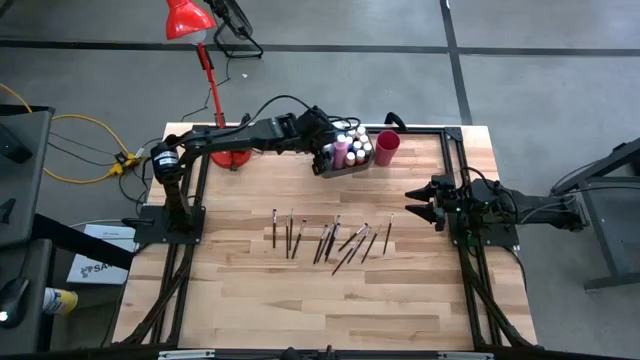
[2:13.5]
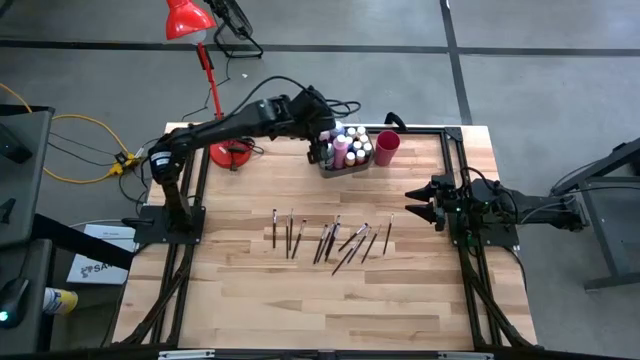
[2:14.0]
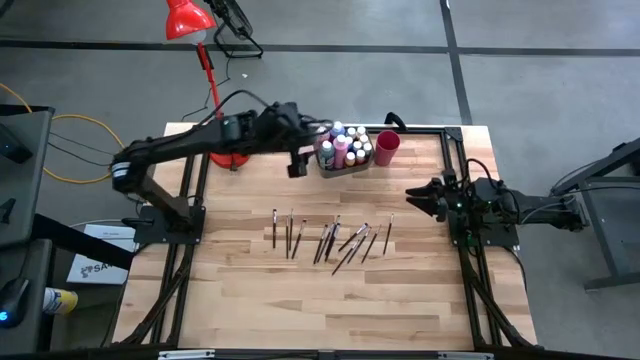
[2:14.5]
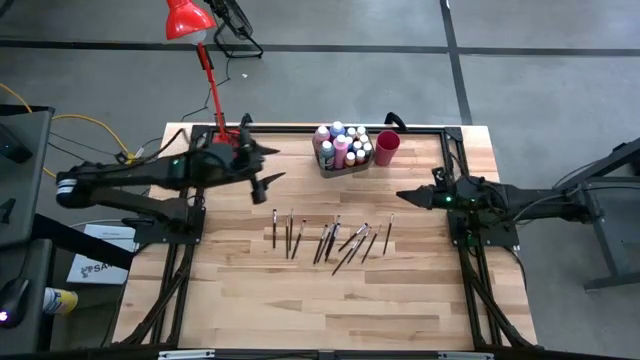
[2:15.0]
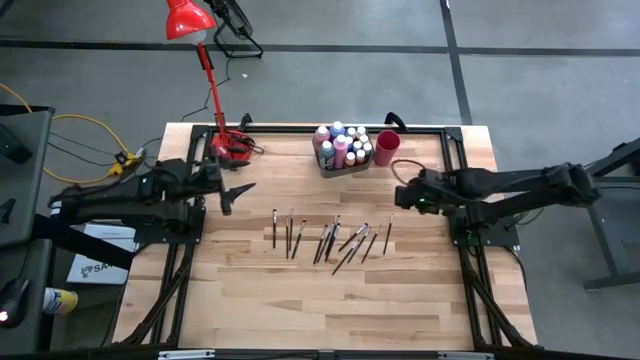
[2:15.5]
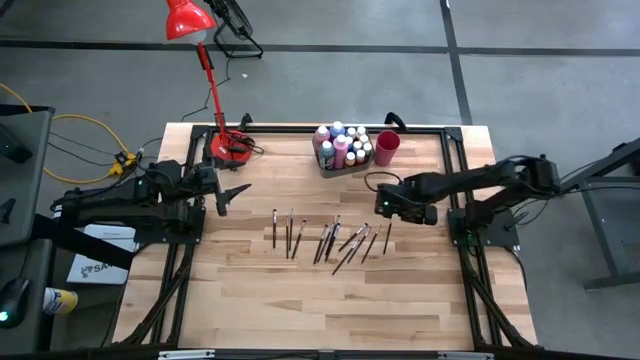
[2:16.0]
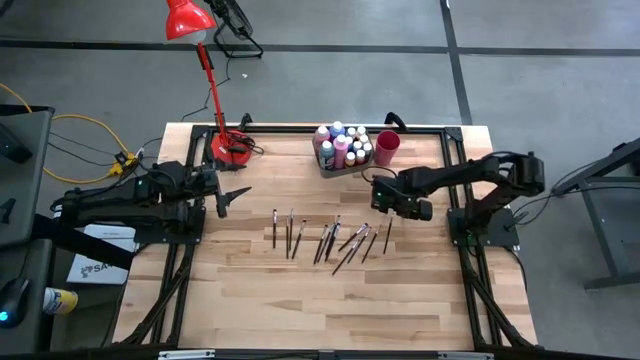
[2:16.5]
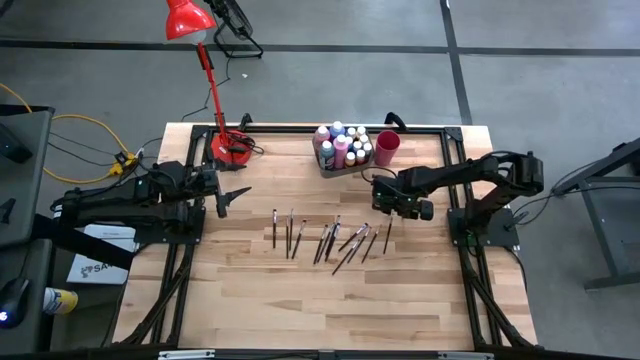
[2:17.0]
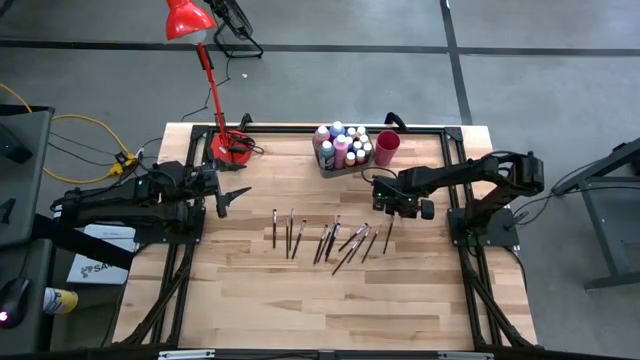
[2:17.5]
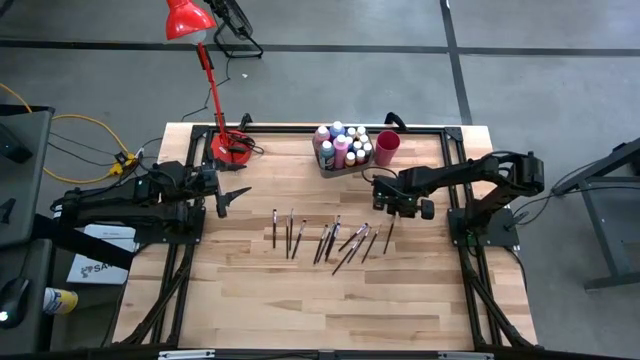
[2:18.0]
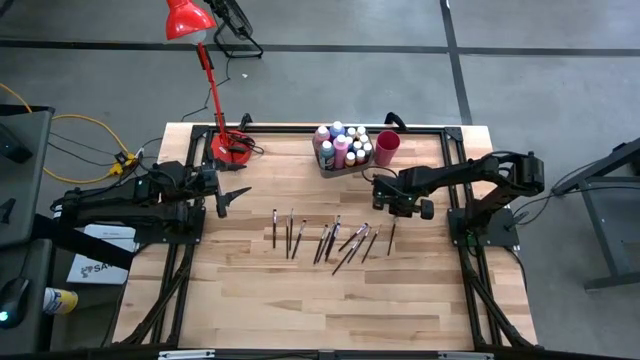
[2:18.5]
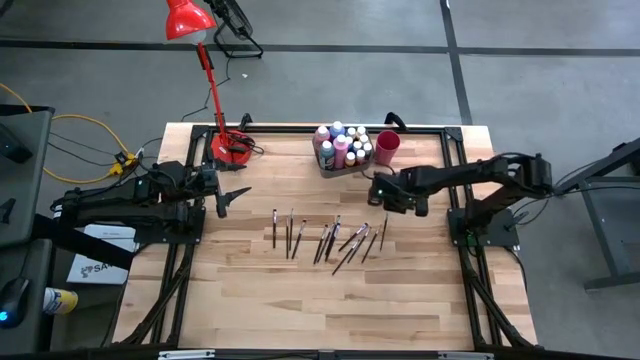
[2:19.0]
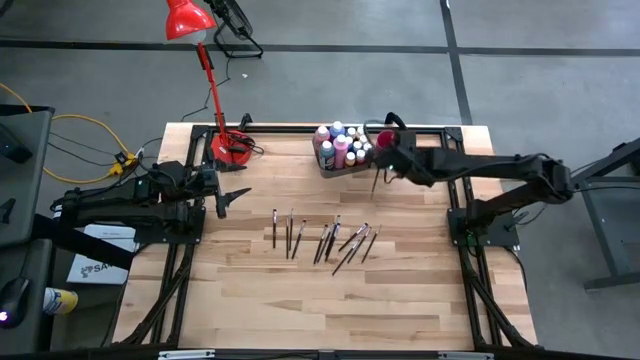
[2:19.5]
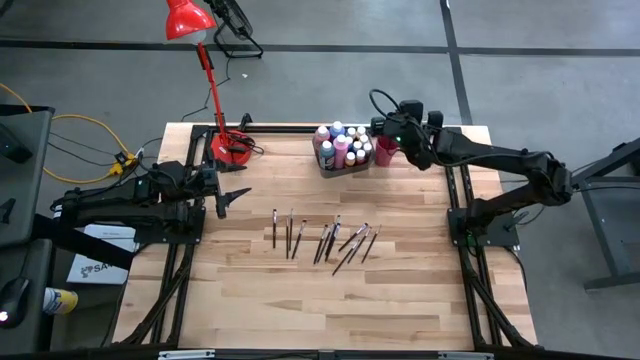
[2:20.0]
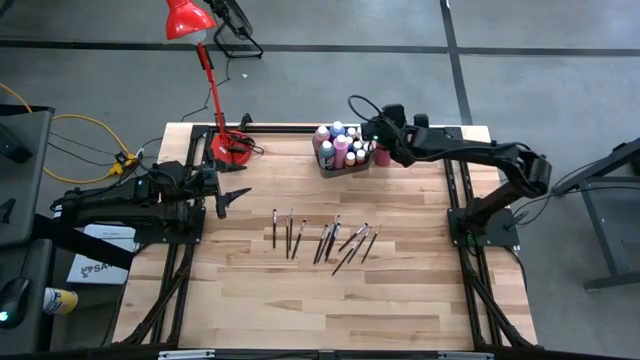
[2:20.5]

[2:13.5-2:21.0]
Task: Pick & Place Paint Supplies
Put the black paintbrush into the red cup

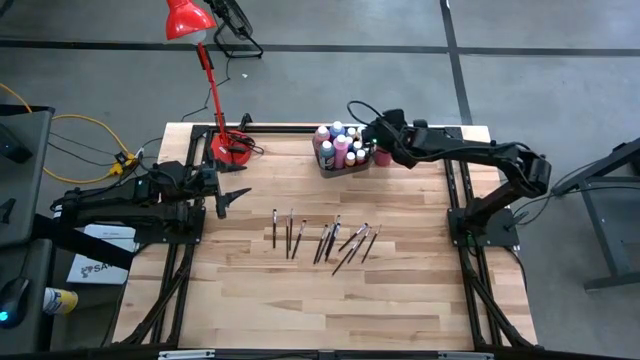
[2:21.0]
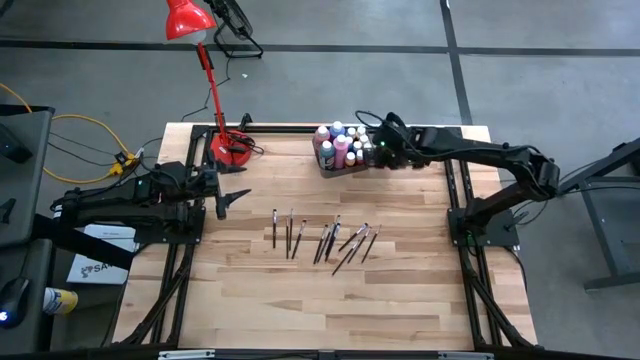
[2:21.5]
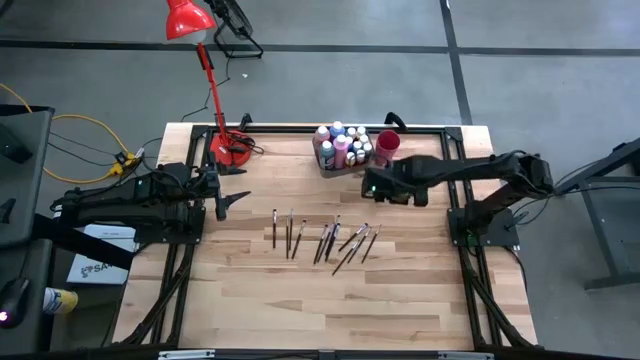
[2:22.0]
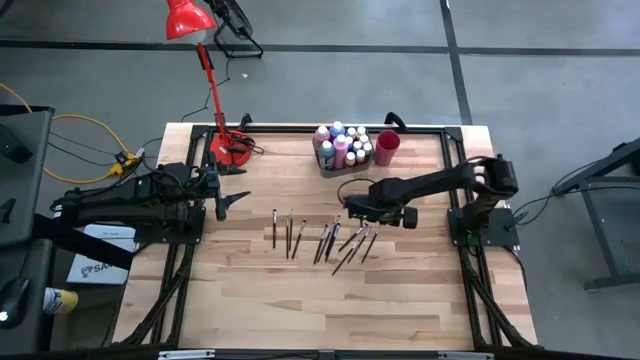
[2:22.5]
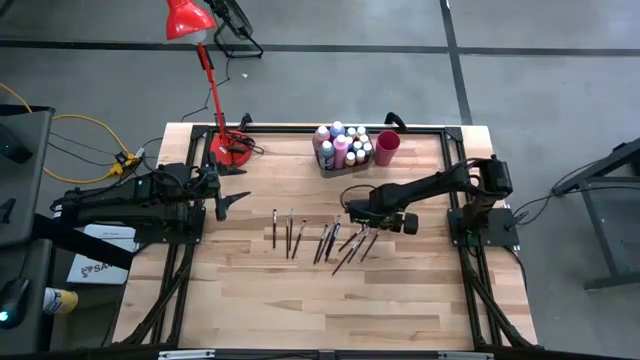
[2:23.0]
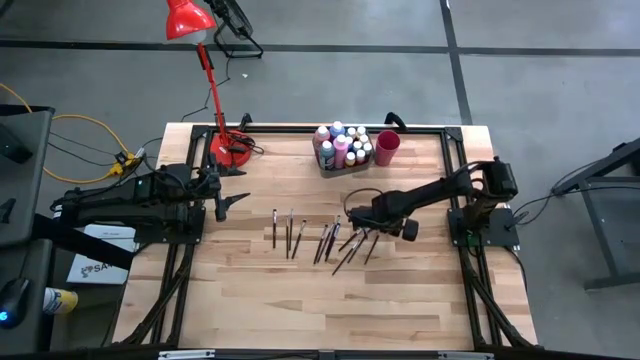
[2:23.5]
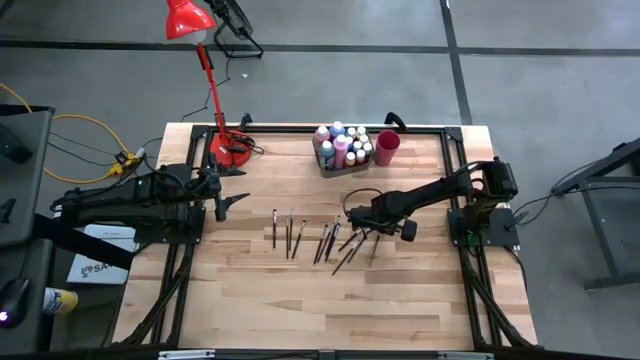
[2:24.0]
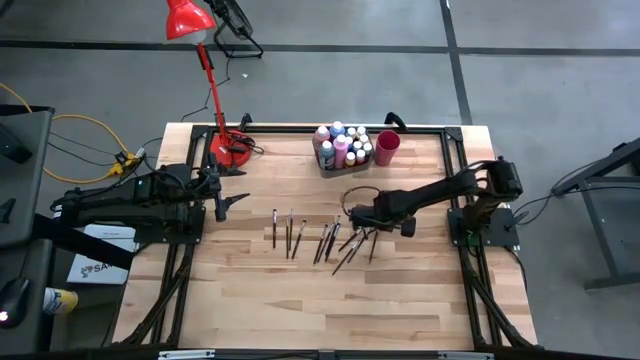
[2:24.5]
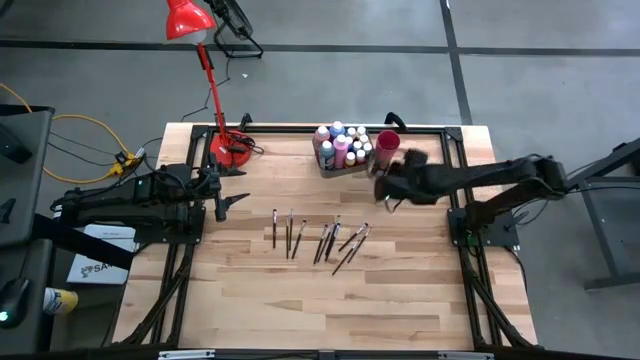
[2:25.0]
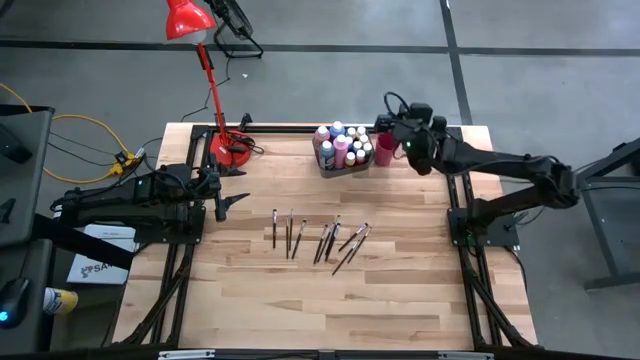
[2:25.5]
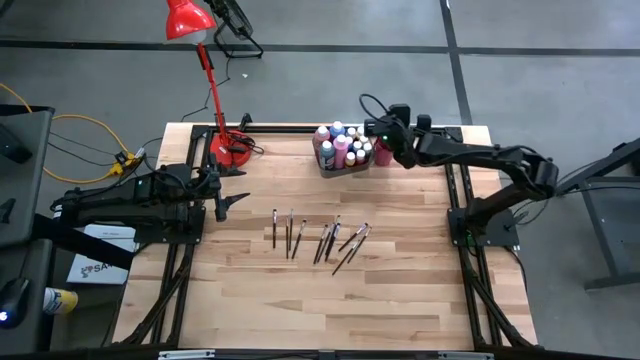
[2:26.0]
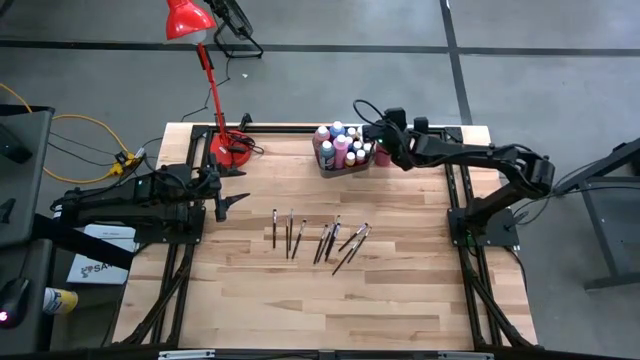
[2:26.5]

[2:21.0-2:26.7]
Put the black paintbrush into the red cup

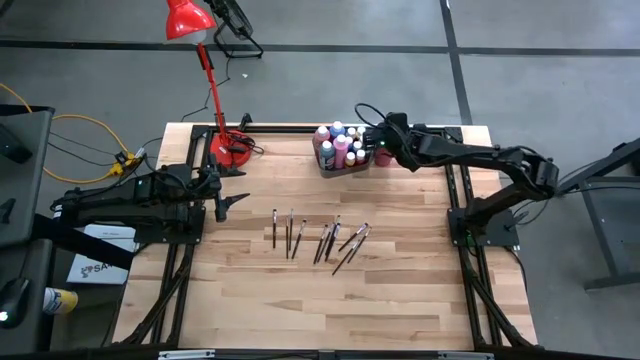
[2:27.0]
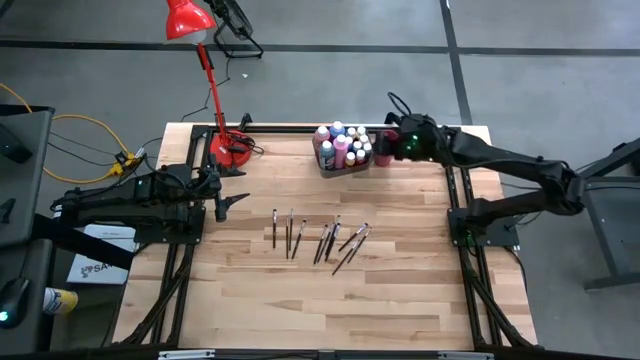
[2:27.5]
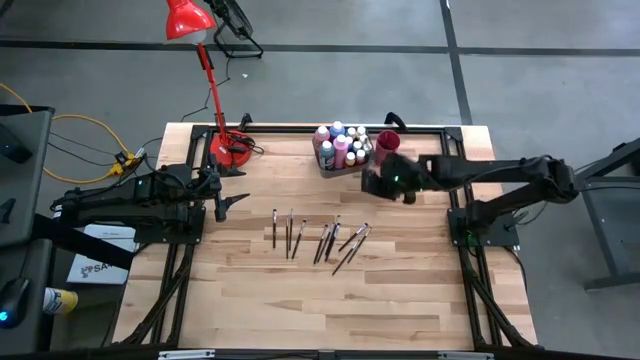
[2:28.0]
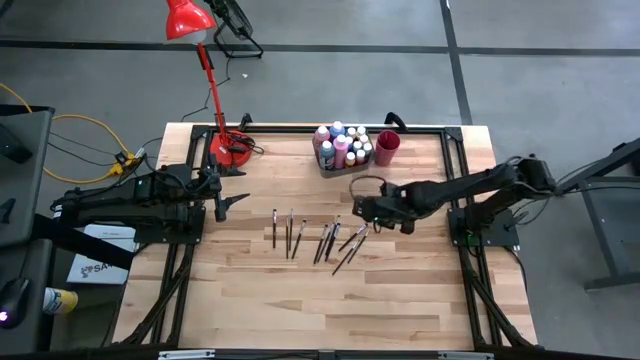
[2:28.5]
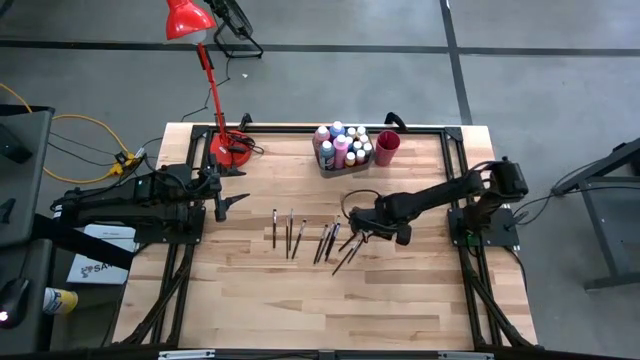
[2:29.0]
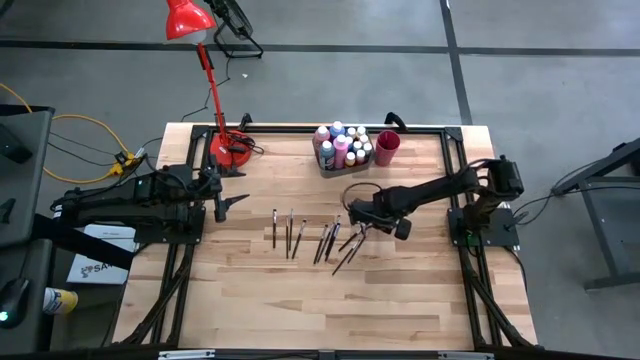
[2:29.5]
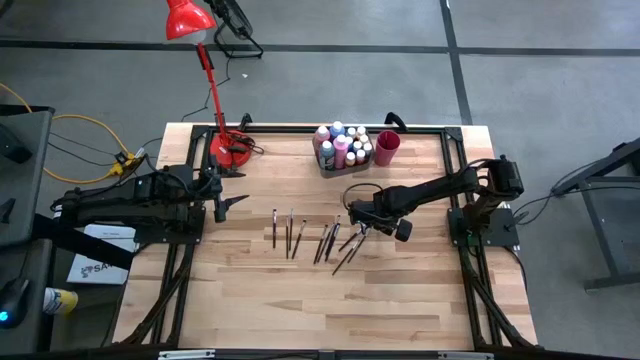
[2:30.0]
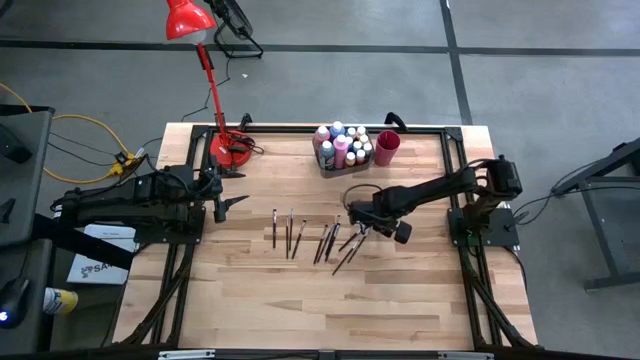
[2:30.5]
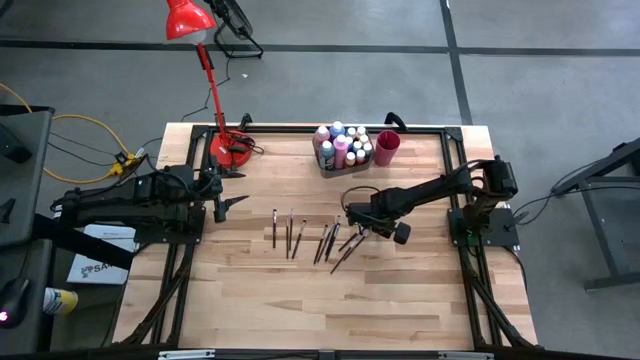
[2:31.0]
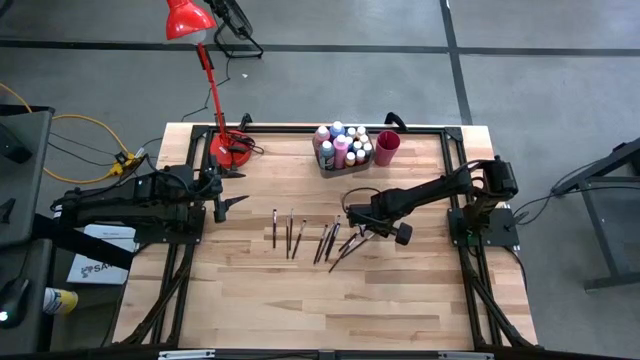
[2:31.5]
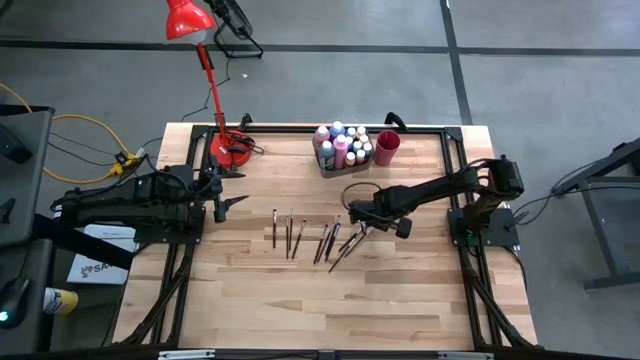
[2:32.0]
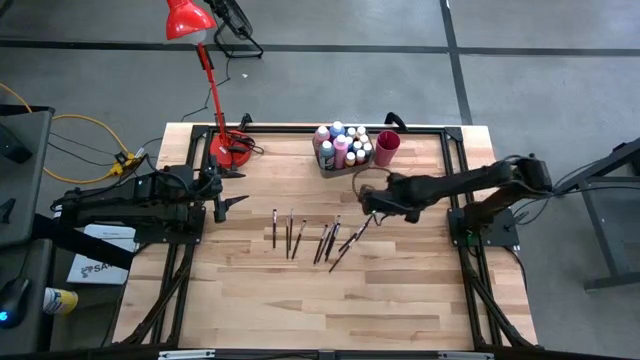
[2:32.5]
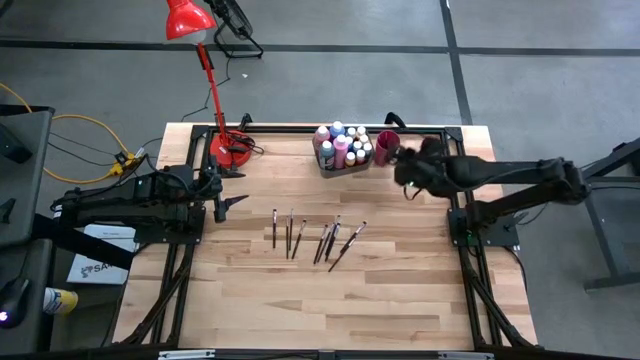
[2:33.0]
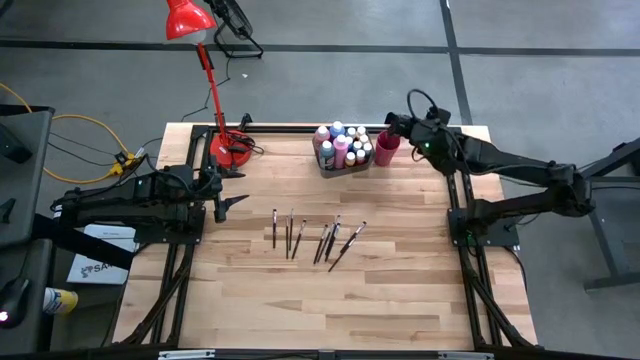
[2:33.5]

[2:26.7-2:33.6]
Put the black paintbrush into the red cup

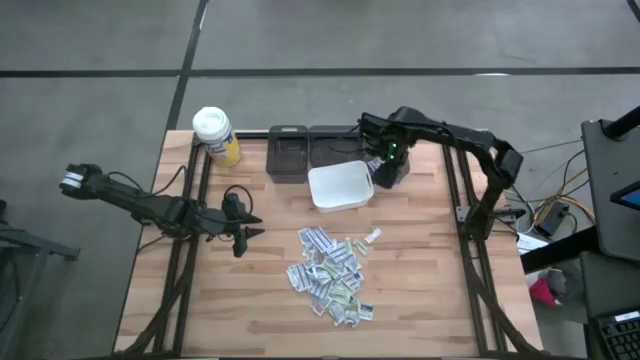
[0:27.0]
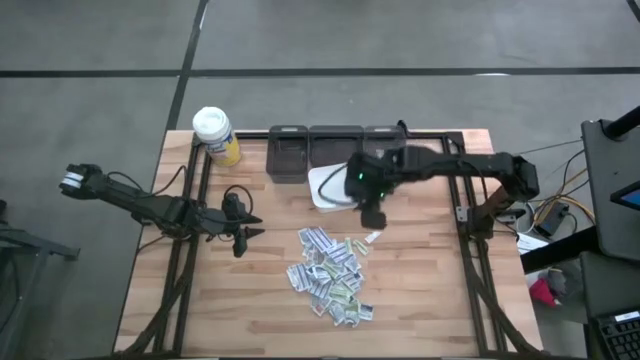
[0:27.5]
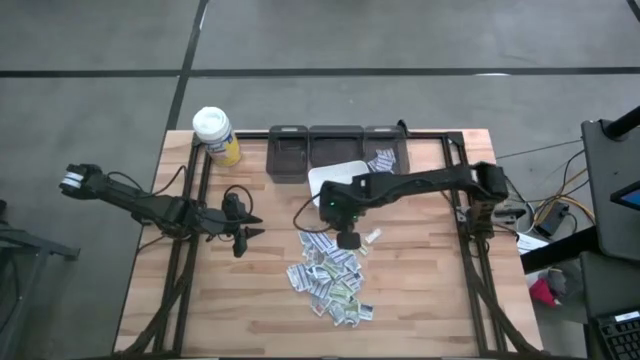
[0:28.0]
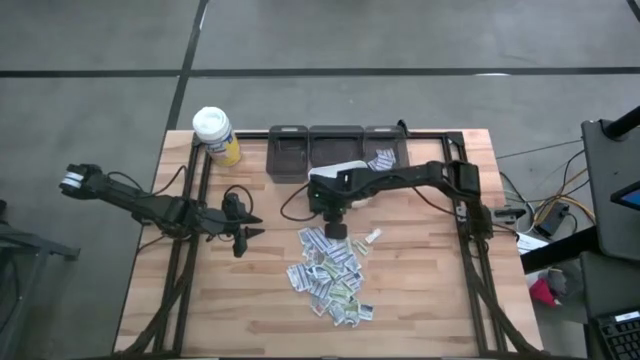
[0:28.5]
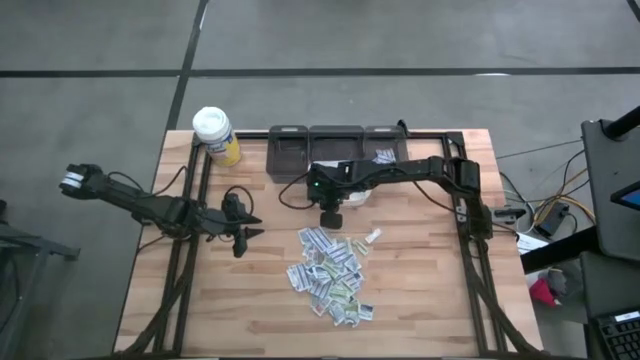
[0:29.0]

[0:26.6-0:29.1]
Task: Pick & Place First Aid Supplies
Adjust the white bin
